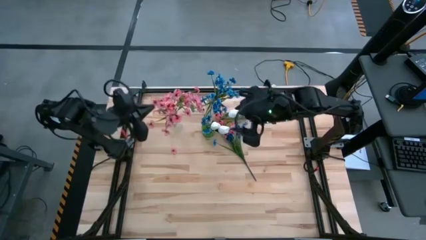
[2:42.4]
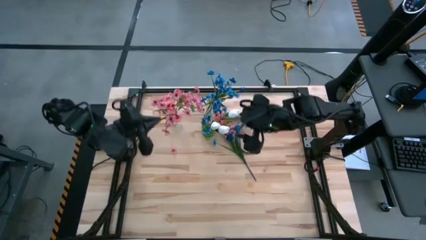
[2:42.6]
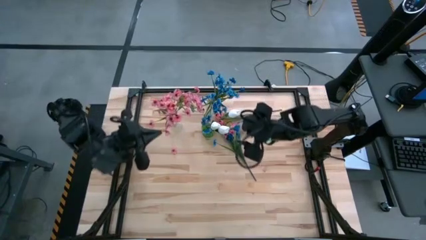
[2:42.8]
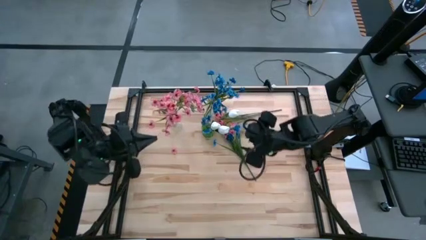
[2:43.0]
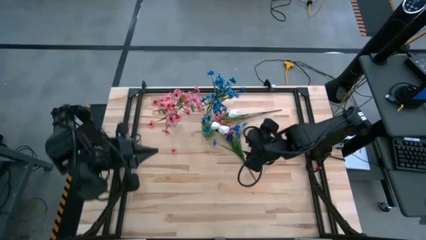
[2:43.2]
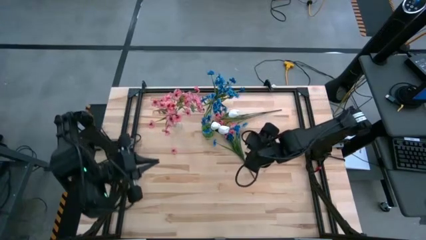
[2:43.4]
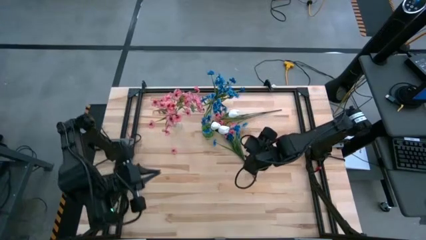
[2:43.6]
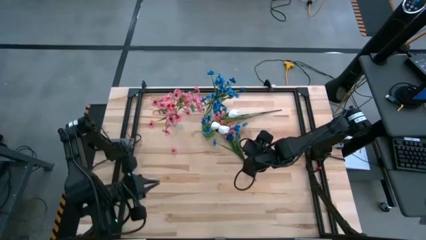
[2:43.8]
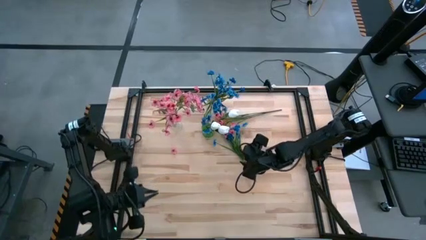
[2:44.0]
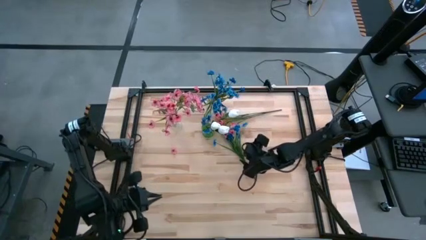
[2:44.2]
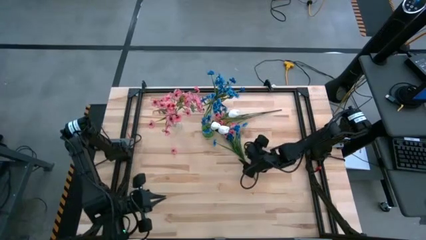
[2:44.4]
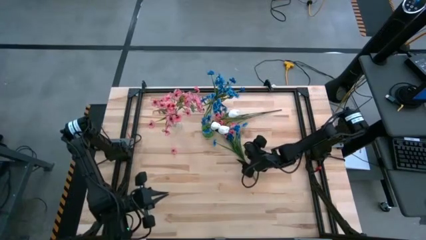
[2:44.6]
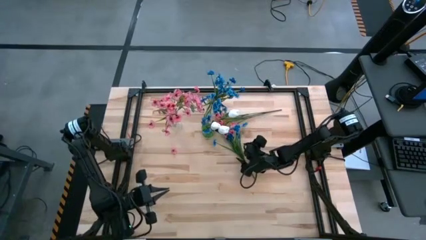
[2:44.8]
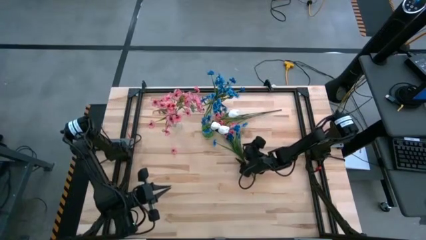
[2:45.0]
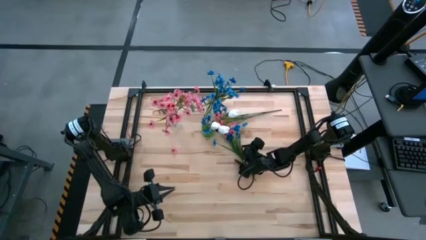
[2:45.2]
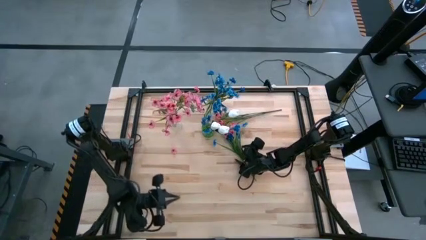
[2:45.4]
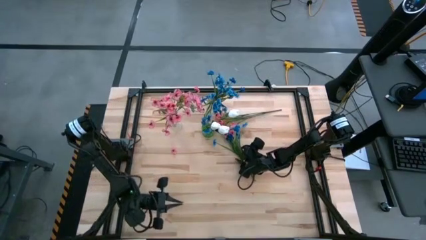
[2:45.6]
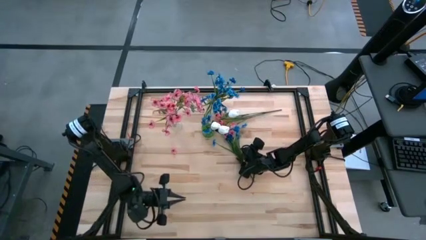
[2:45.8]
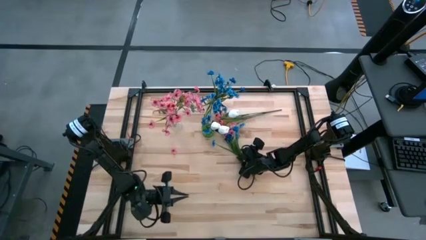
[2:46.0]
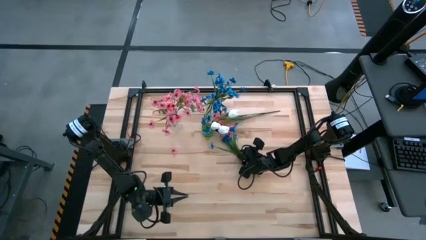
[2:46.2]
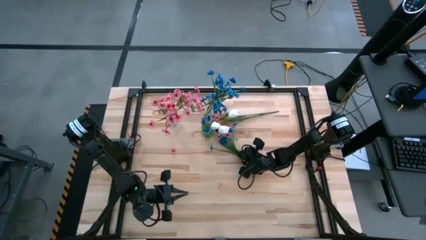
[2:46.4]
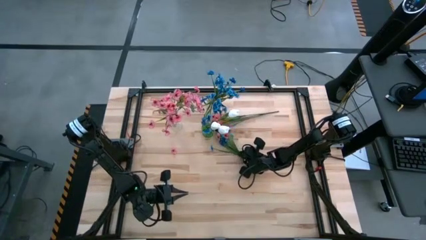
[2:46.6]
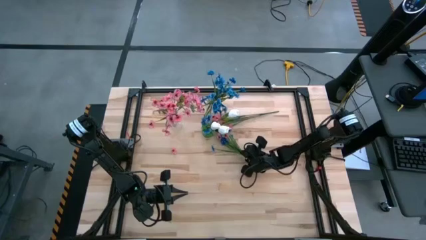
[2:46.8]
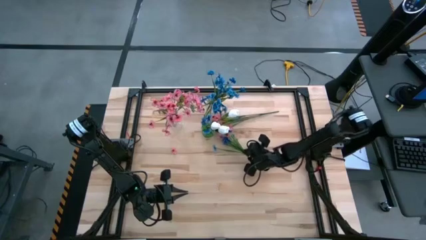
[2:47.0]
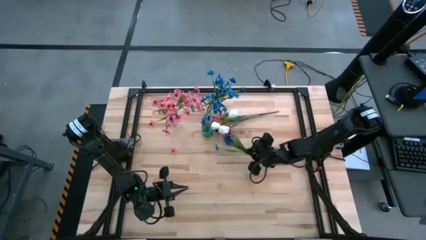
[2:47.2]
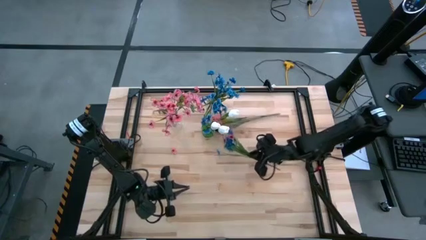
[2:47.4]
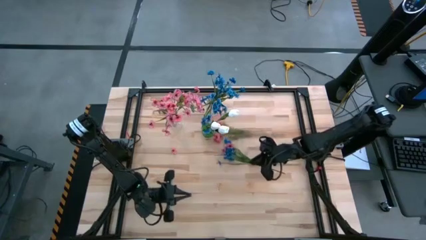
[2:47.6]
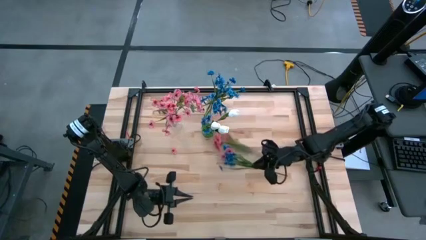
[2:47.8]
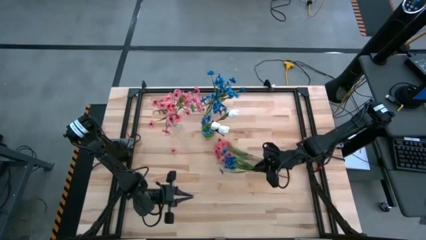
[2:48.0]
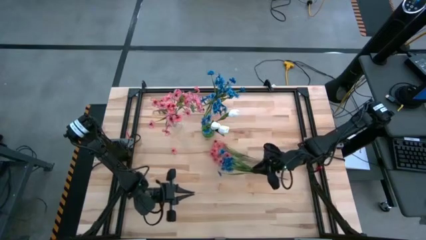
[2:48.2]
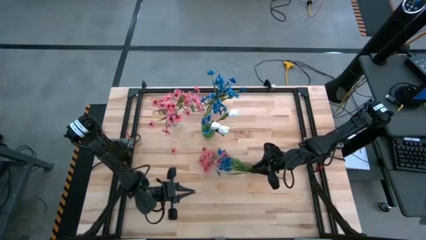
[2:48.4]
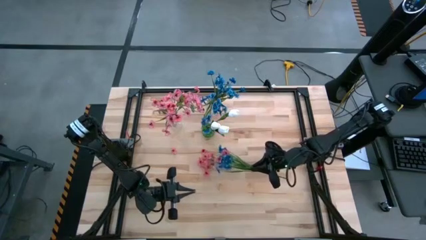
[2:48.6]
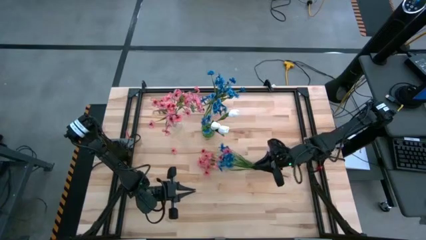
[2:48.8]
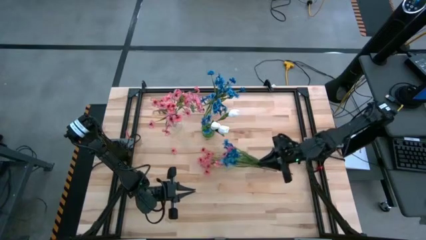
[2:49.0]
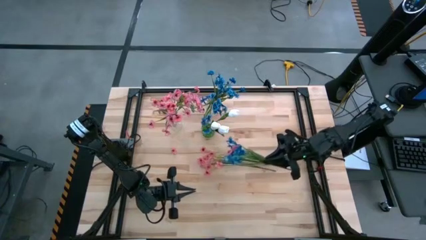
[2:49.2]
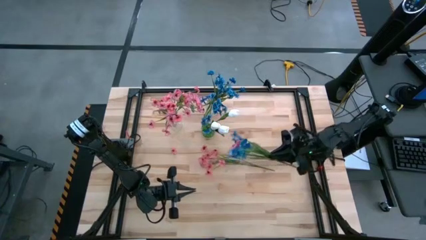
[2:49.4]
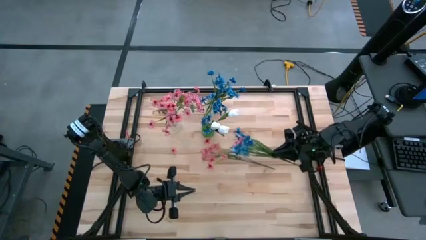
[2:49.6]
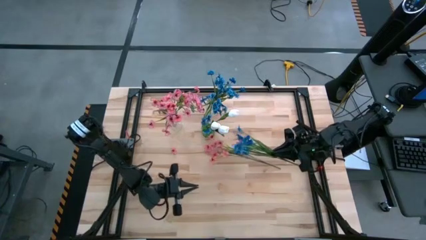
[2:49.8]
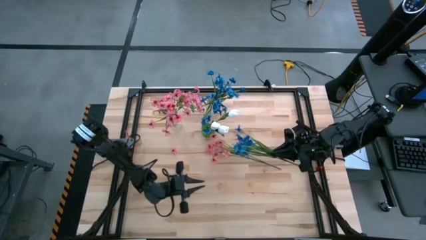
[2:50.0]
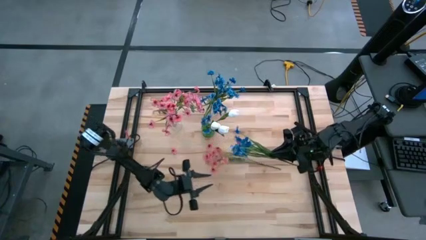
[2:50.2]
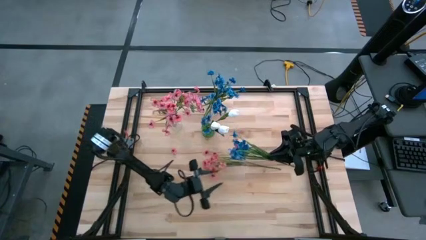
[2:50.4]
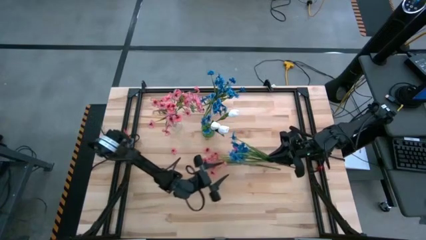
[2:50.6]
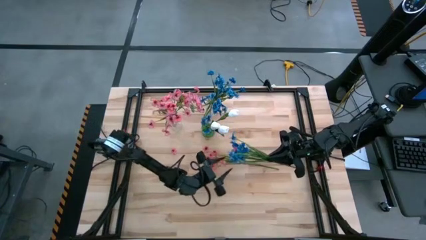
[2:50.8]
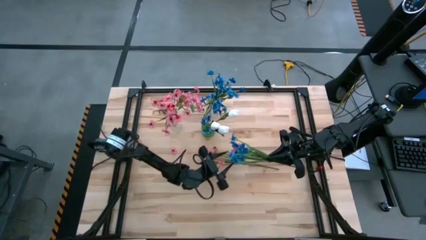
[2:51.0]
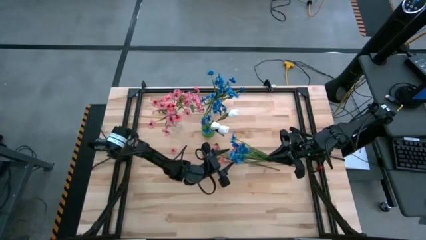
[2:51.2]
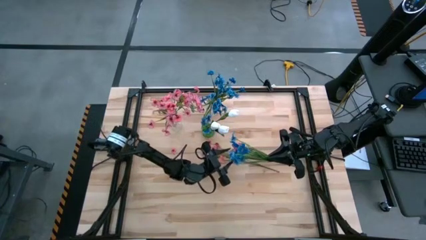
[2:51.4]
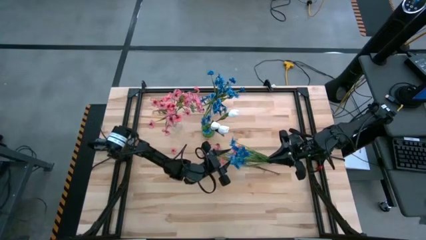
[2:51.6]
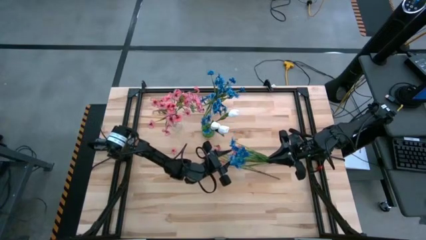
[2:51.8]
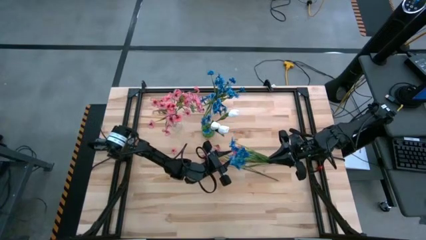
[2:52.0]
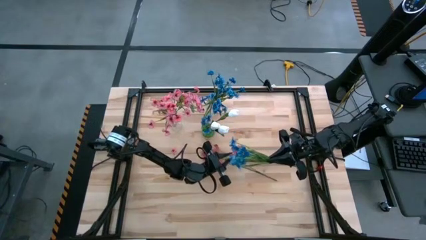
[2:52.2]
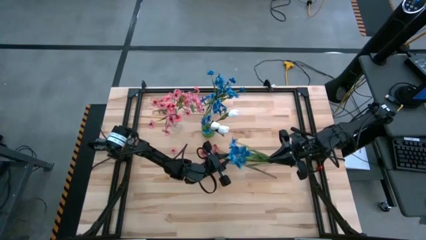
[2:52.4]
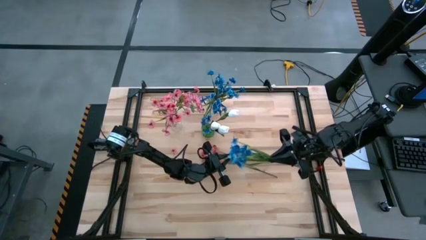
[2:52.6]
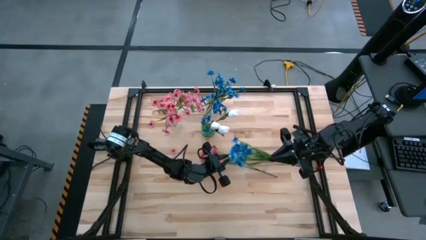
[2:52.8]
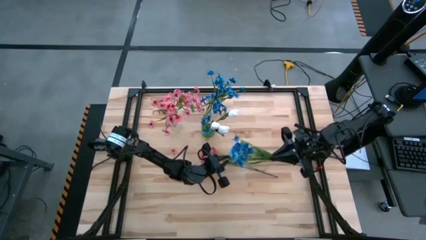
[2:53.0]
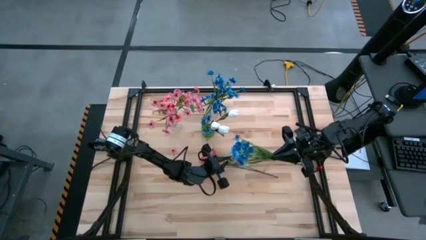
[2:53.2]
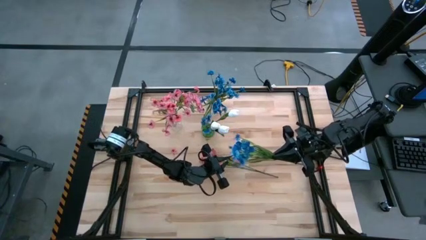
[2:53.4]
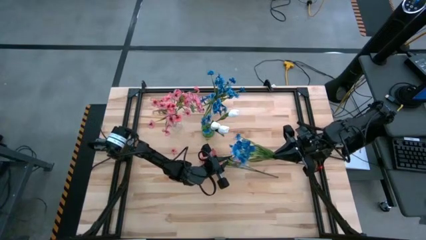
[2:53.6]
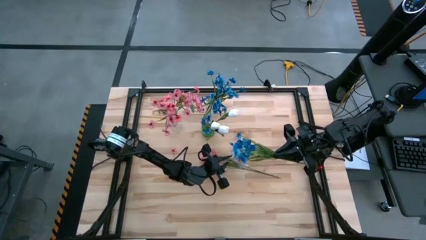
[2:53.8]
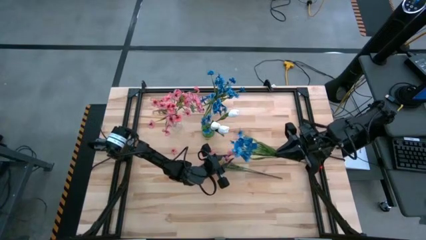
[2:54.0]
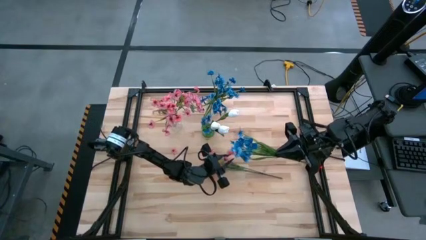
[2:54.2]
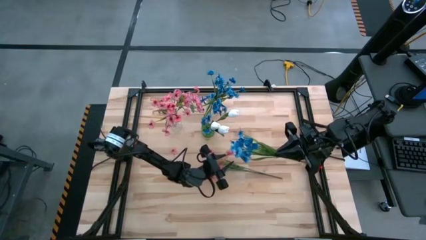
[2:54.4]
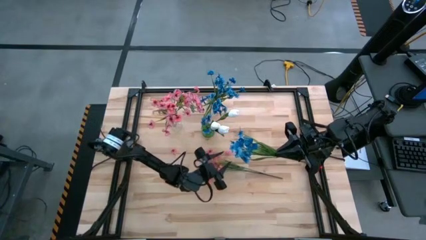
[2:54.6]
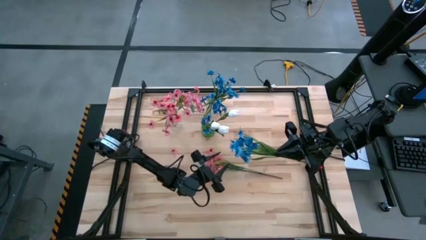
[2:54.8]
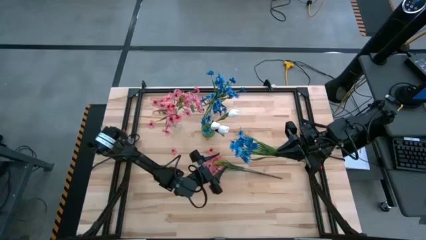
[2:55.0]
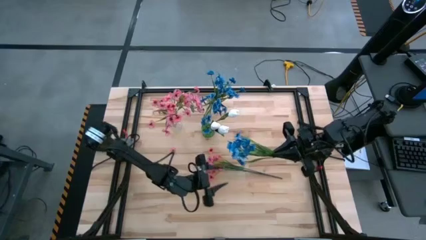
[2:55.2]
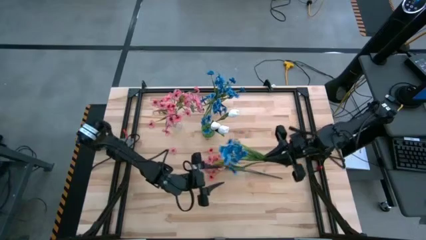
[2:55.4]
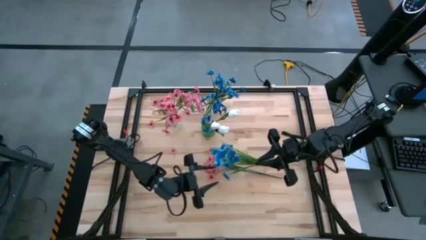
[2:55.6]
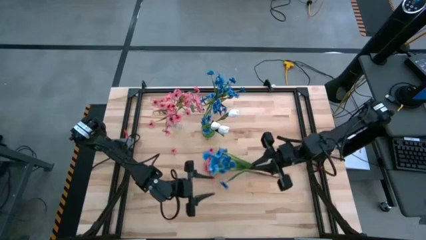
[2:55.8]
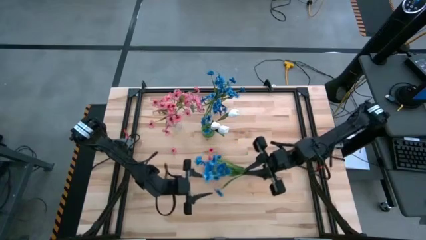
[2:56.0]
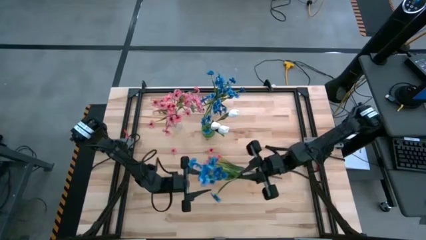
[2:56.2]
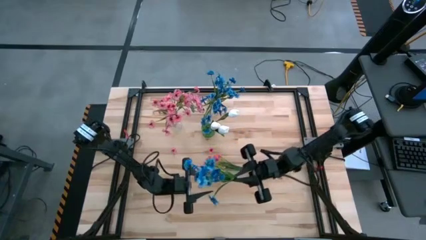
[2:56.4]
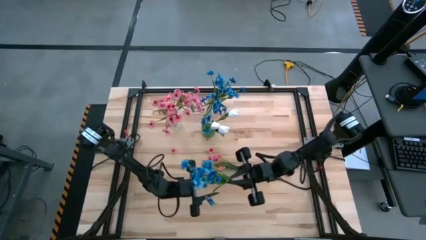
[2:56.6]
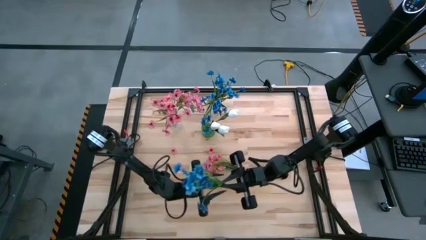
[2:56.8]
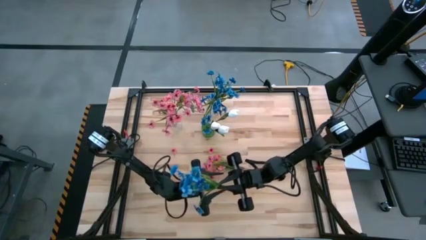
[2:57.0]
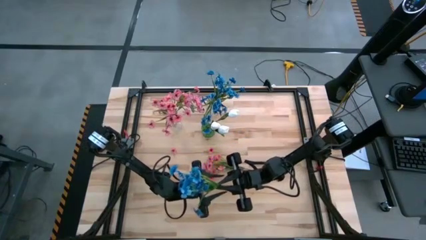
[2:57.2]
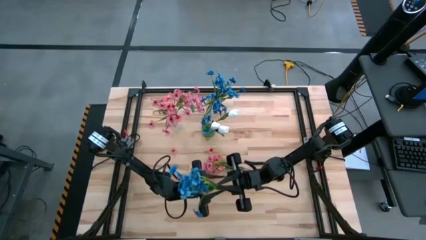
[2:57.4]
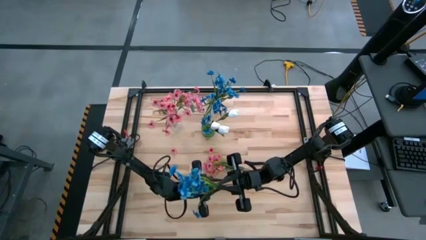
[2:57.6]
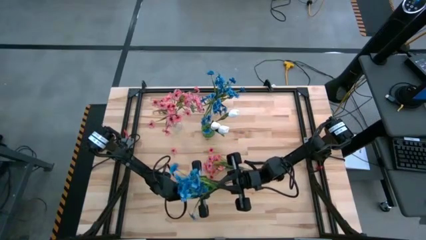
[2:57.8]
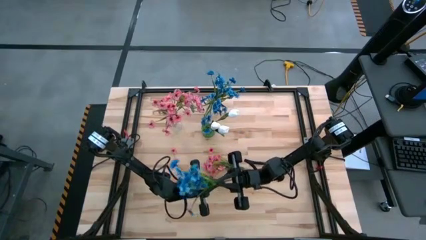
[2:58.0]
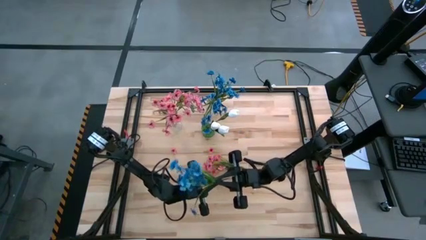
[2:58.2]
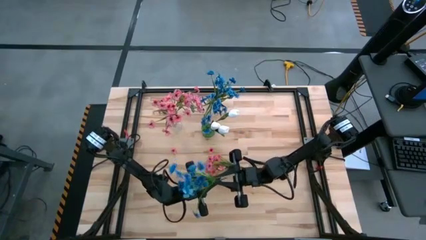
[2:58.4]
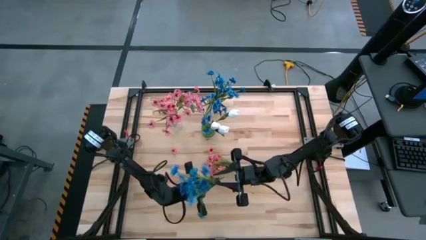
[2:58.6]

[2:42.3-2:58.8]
Task: Sort flowers into vase by color
Put the blue flowers into the right transparent vase

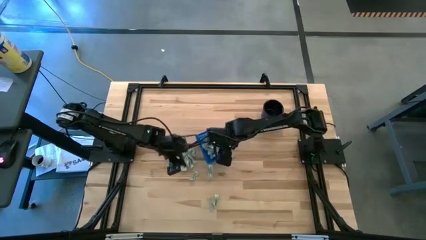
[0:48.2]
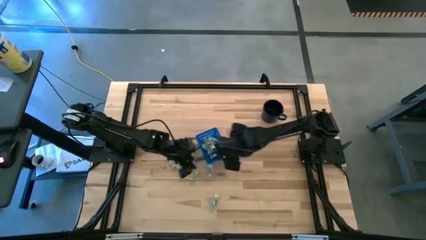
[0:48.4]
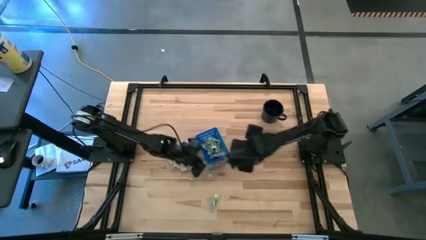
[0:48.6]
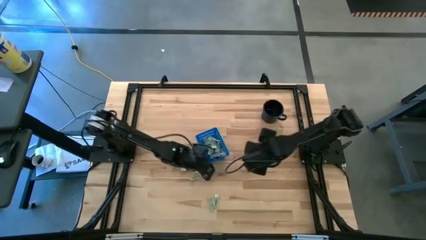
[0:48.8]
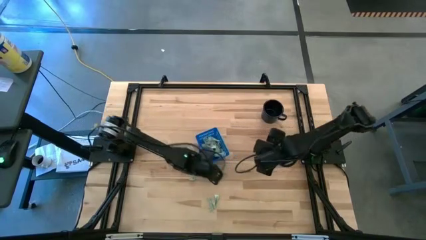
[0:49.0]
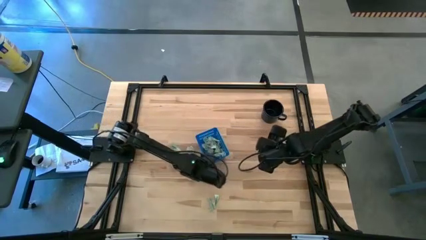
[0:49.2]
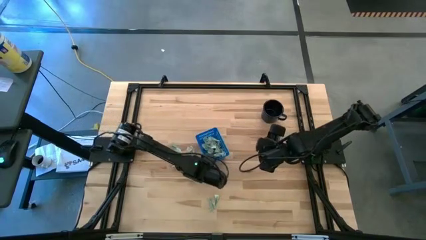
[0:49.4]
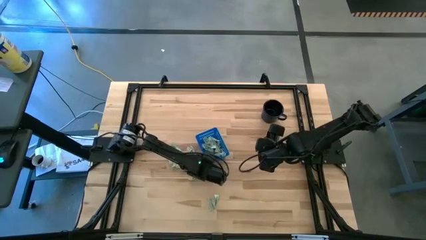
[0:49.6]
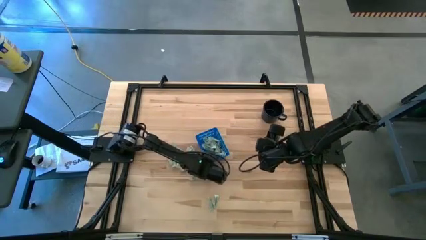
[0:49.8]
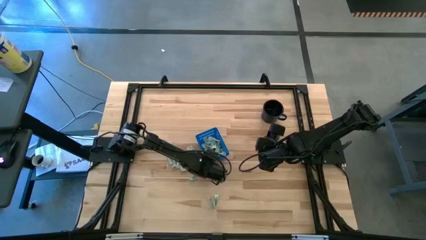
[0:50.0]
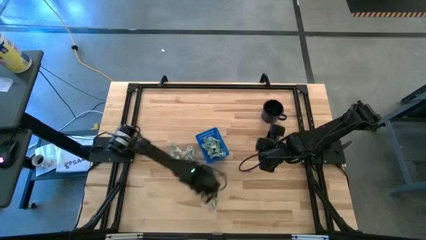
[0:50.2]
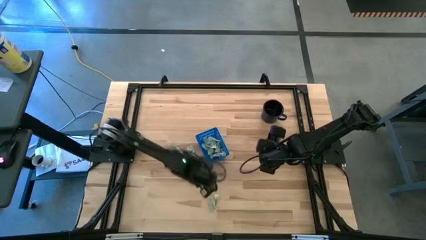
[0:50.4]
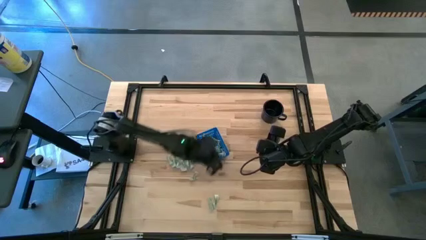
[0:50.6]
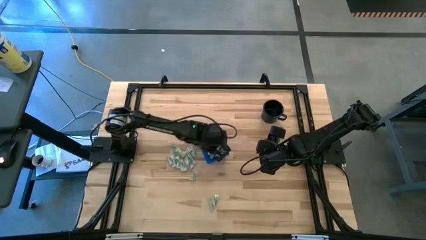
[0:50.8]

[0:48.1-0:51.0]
Task: Pick and place Stevia / Truvia into bins
Put the stevia packet into the basket
